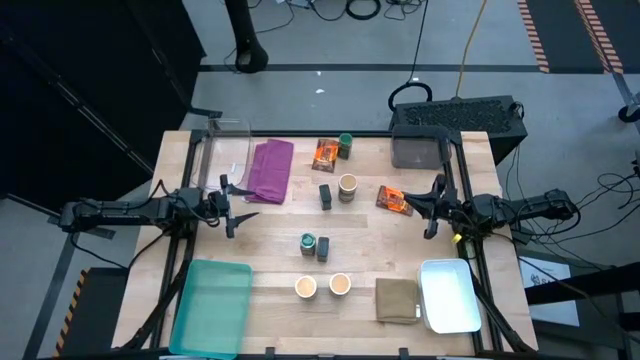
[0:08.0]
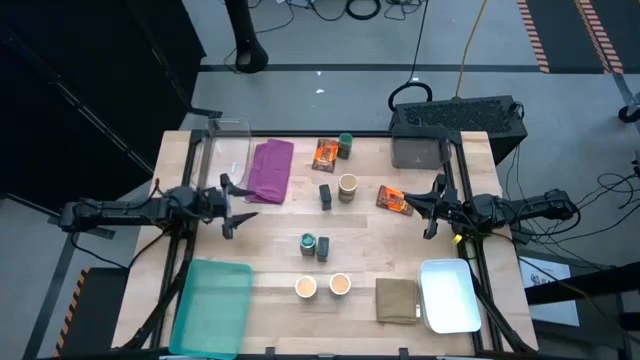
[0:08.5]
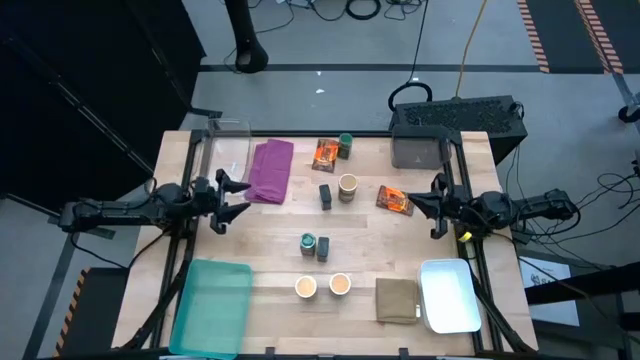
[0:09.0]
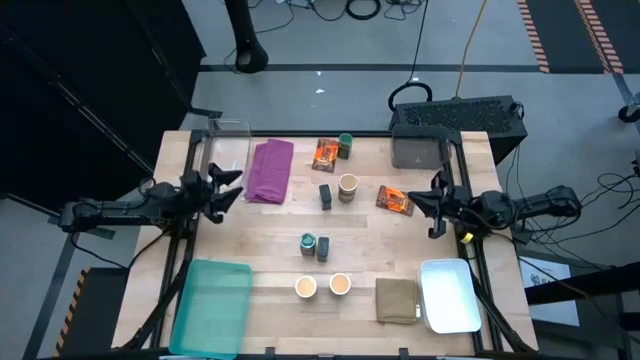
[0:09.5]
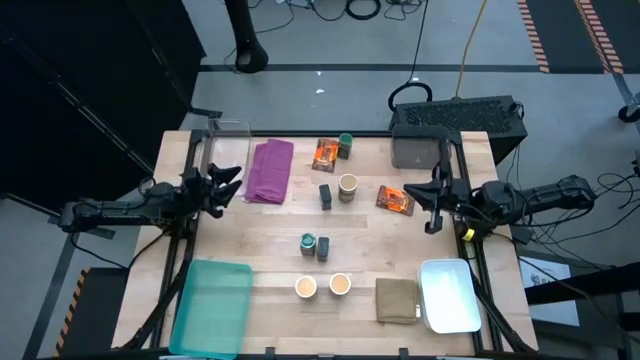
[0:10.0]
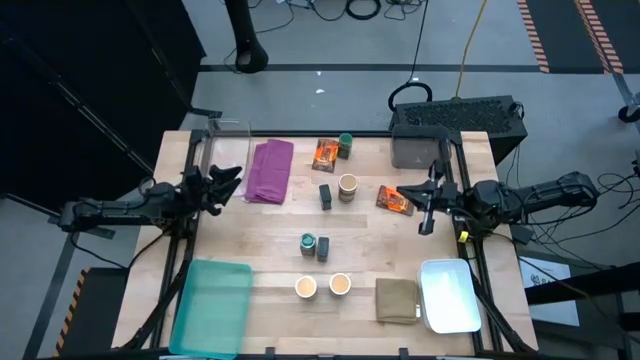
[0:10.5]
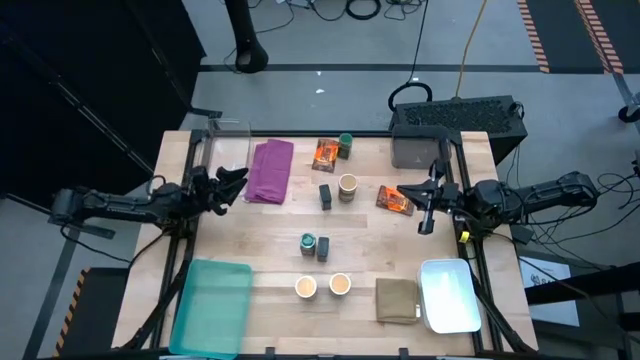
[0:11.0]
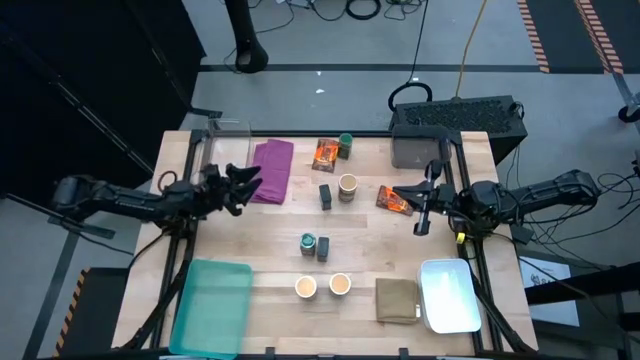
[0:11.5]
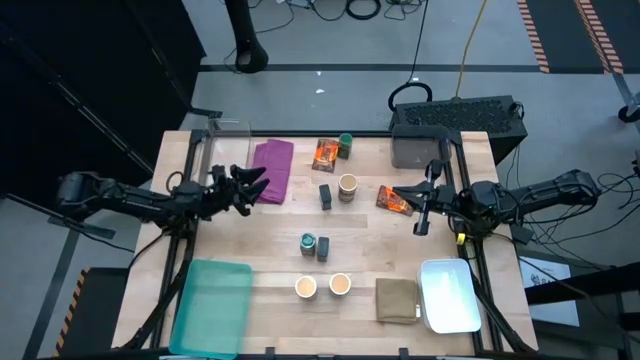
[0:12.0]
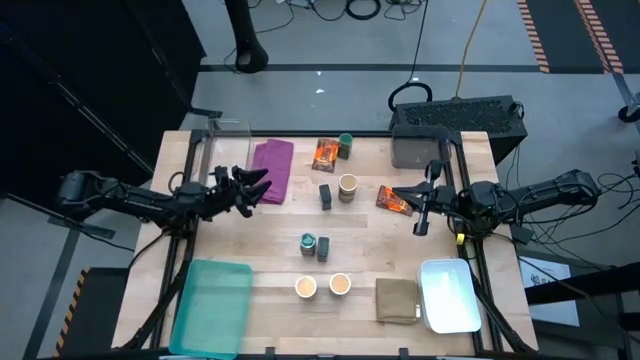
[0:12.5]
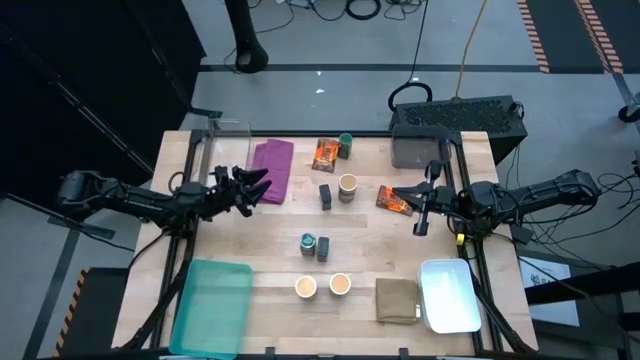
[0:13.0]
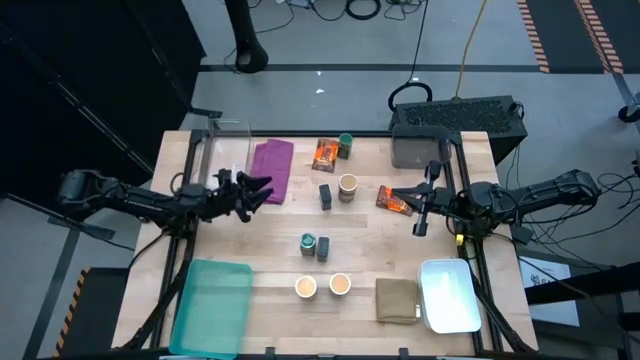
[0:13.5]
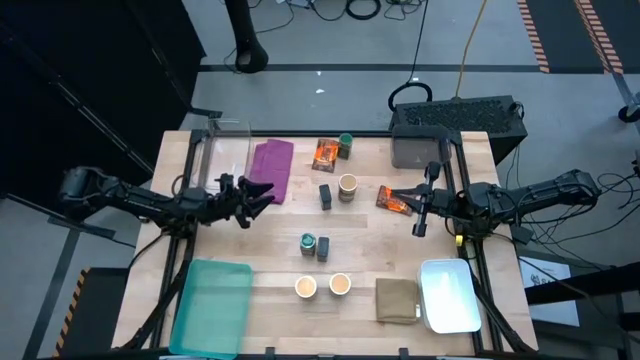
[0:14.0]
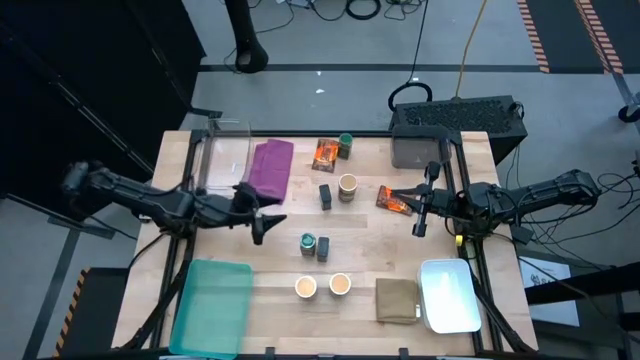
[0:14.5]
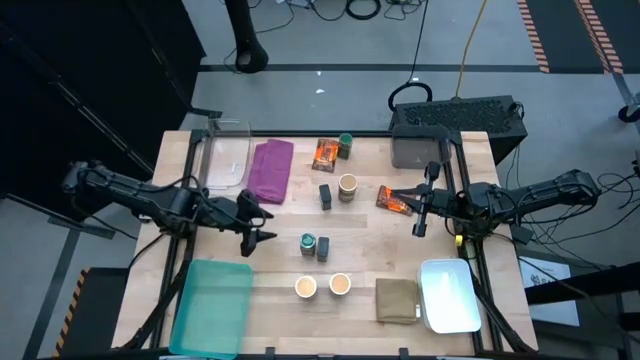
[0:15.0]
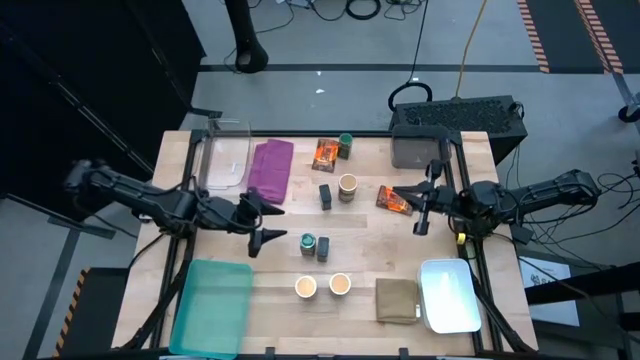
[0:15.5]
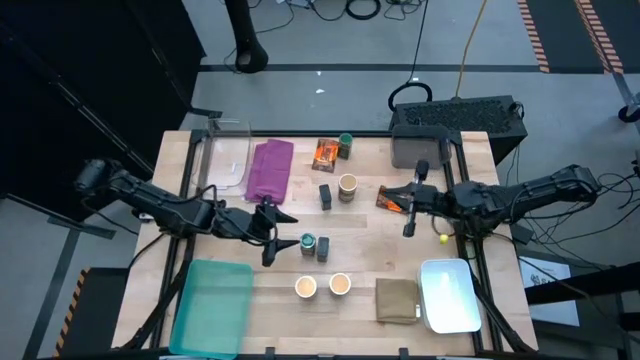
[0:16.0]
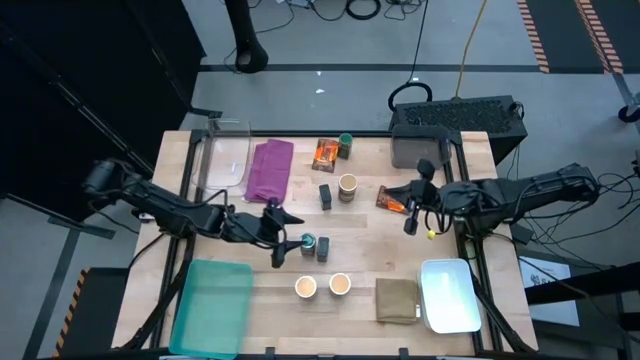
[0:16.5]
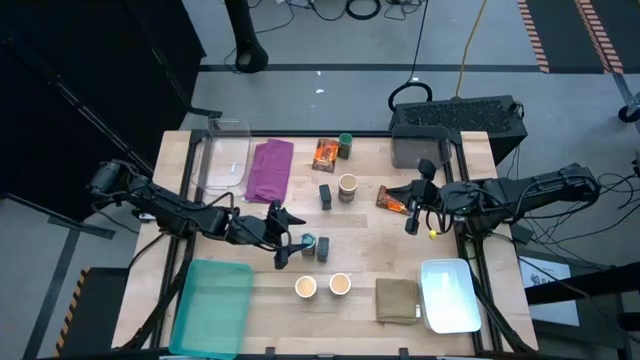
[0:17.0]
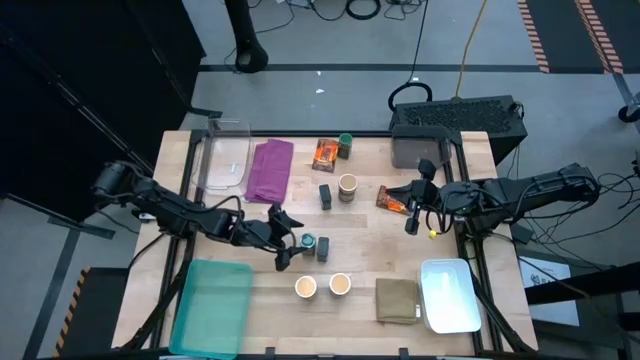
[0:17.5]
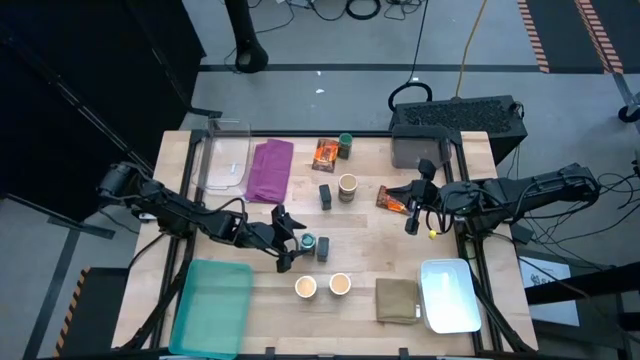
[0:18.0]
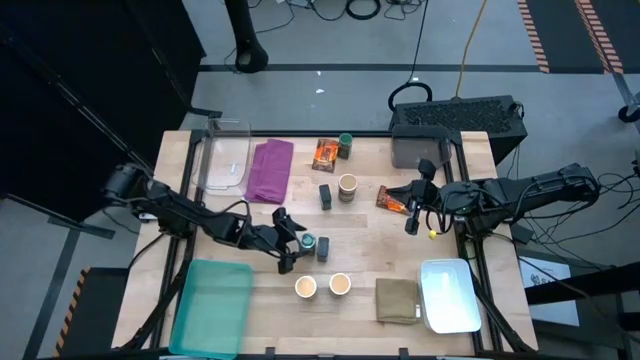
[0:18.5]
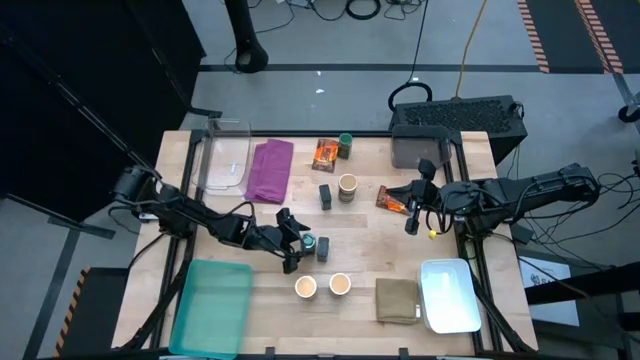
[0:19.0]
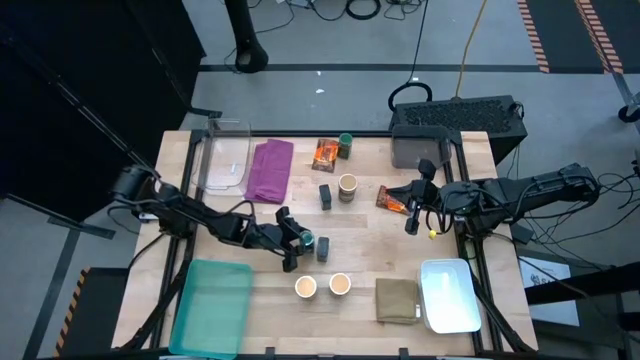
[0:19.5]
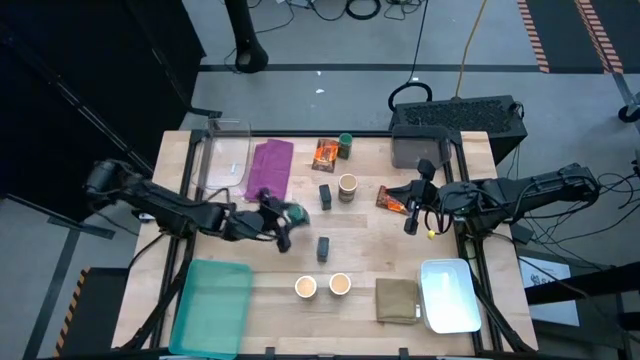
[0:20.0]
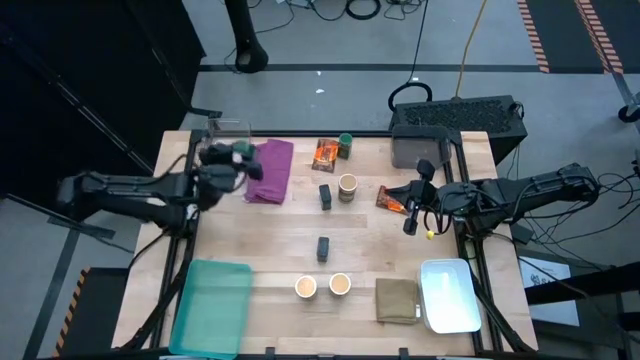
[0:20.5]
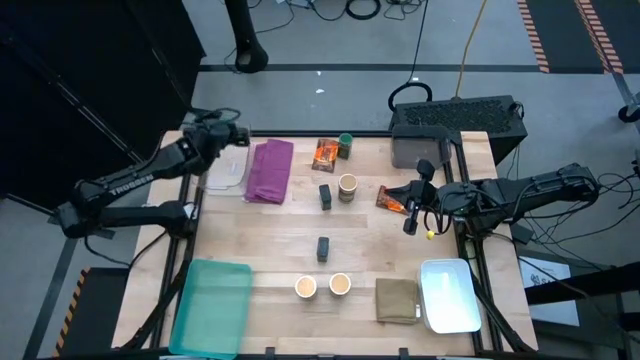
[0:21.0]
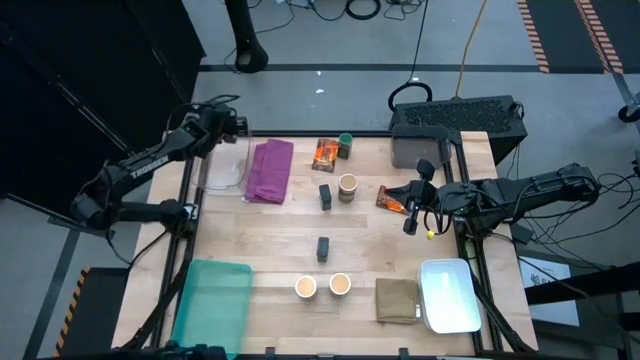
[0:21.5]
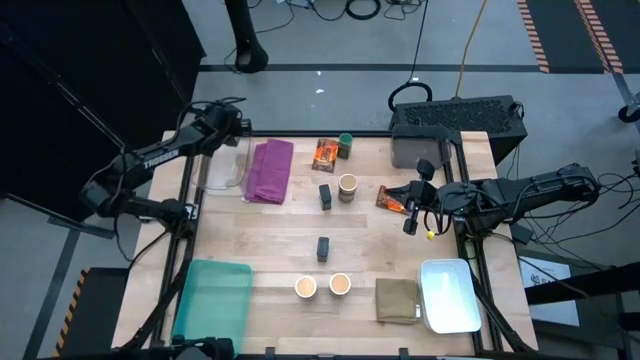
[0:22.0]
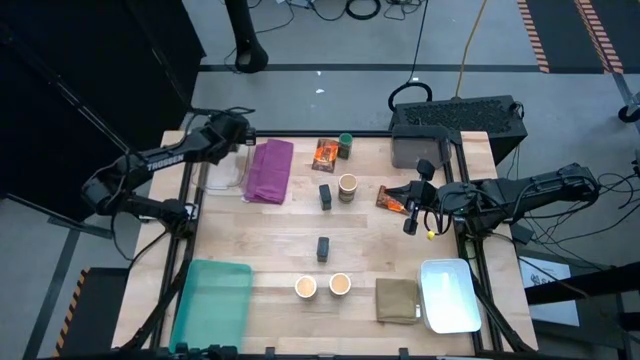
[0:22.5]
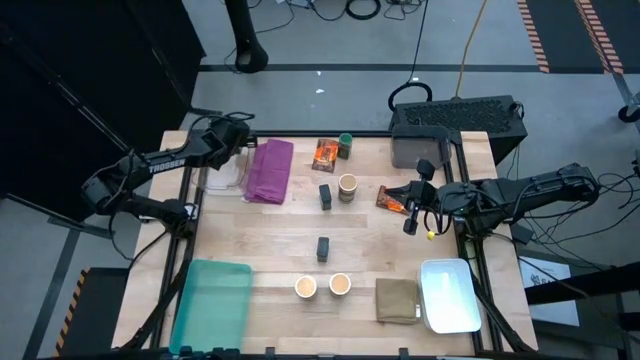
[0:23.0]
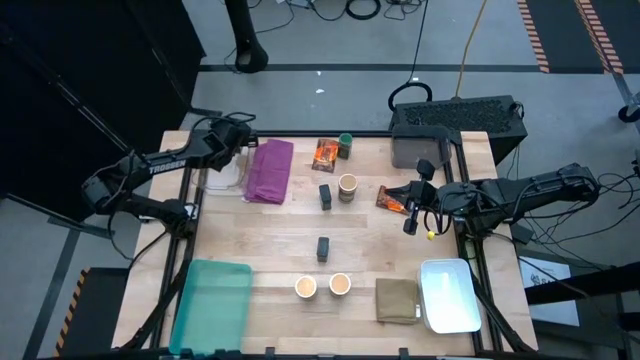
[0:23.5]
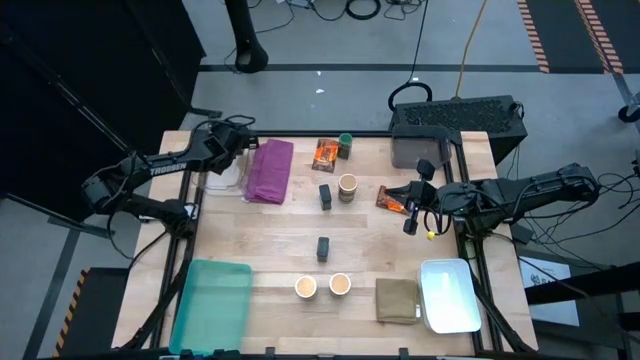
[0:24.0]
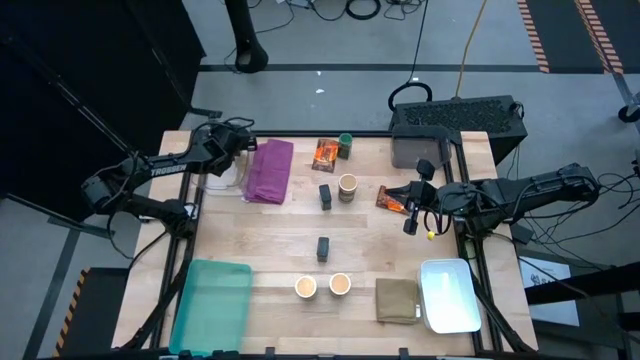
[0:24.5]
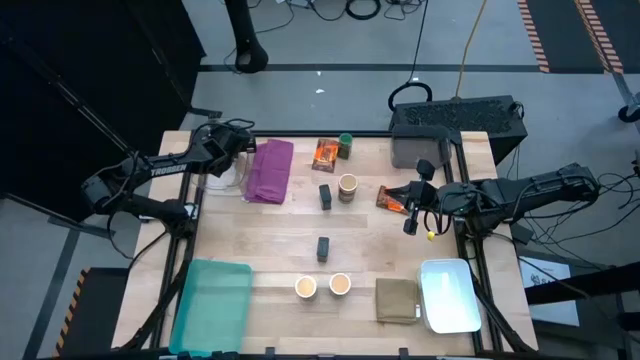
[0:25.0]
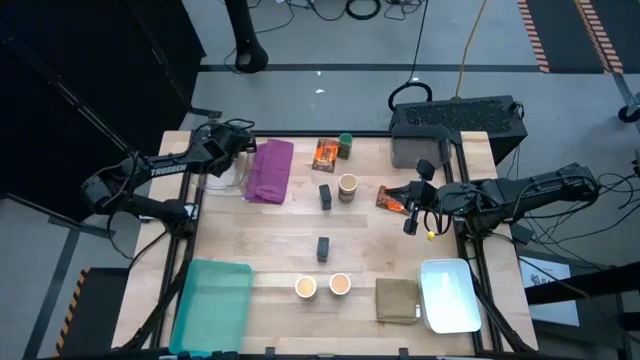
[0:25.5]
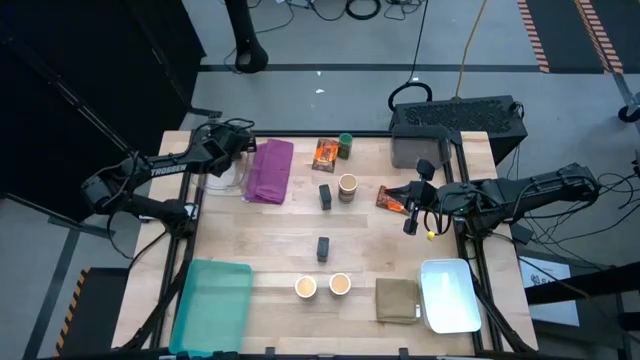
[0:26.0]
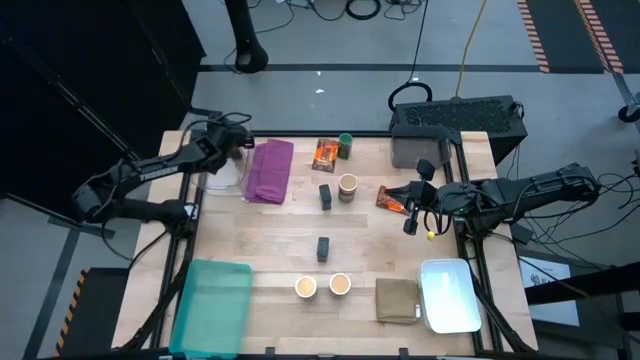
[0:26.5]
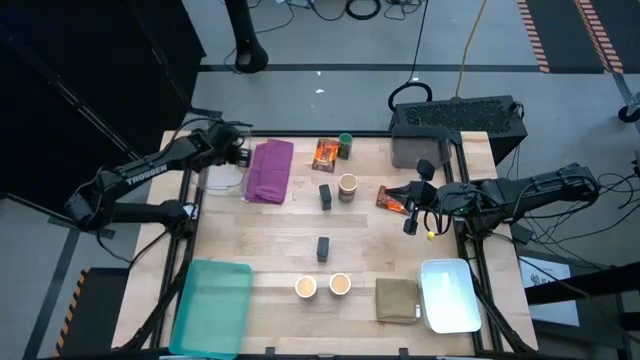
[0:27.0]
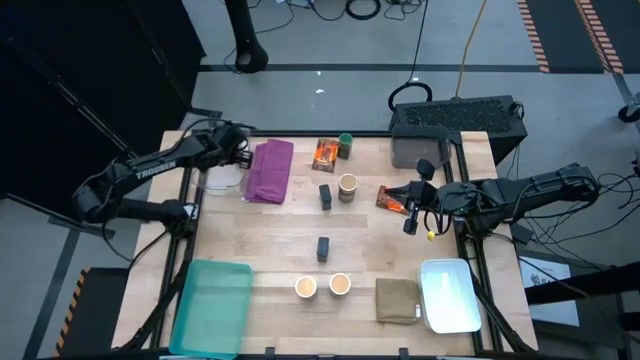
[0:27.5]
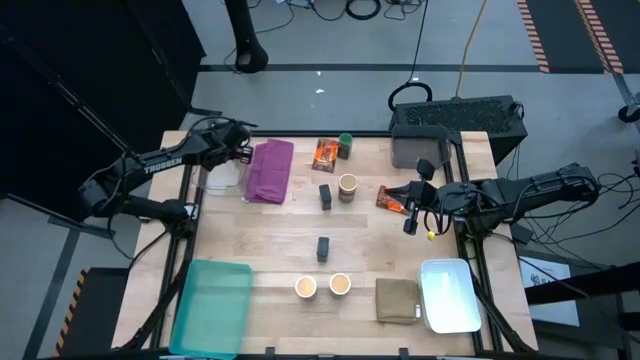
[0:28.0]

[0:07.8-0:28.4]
Task: Sort spices by type
Put the bottom green seasoning bottle into the transparent bin
